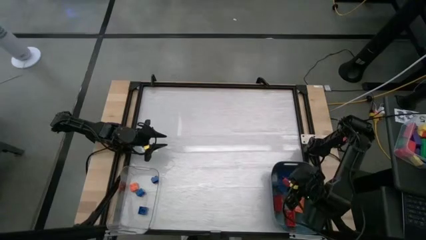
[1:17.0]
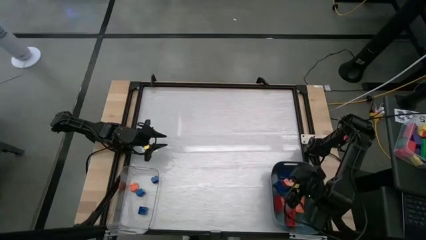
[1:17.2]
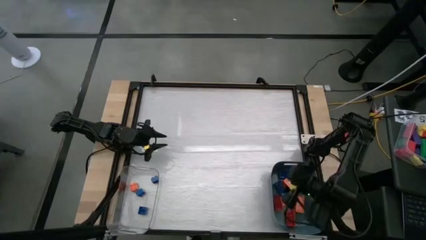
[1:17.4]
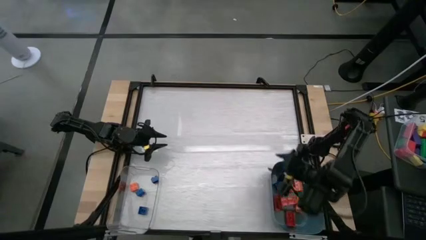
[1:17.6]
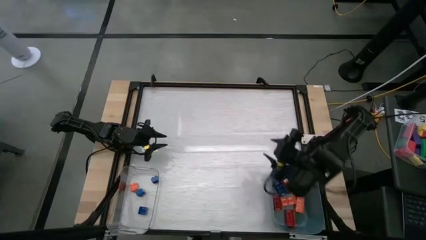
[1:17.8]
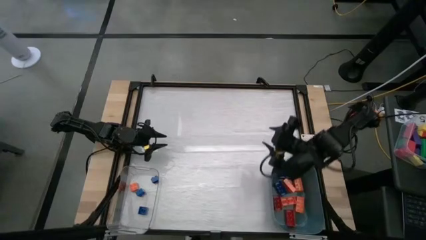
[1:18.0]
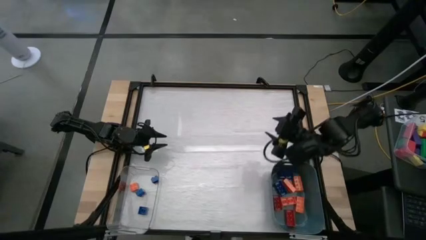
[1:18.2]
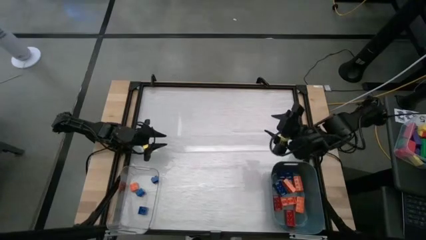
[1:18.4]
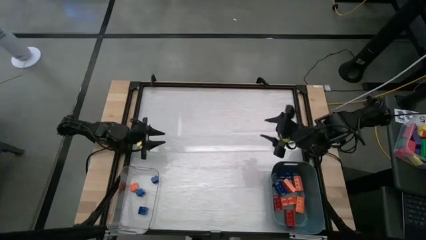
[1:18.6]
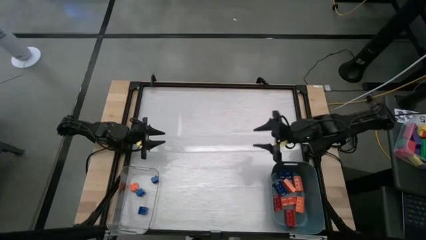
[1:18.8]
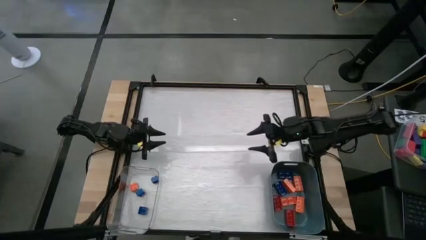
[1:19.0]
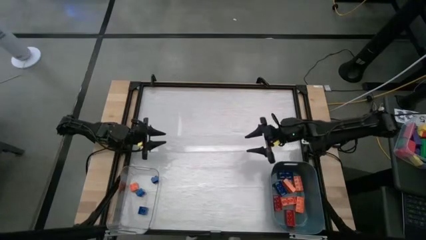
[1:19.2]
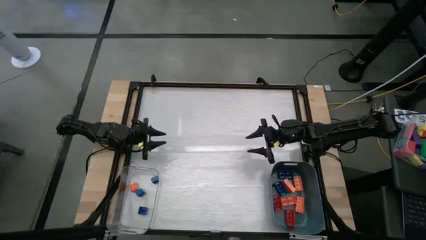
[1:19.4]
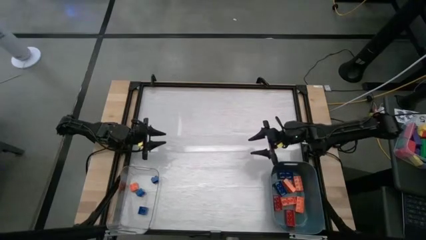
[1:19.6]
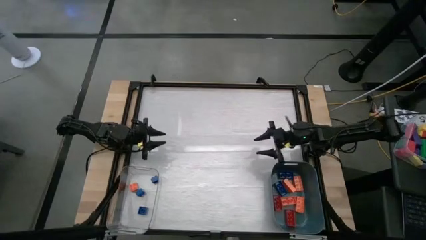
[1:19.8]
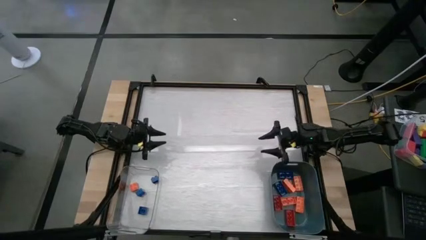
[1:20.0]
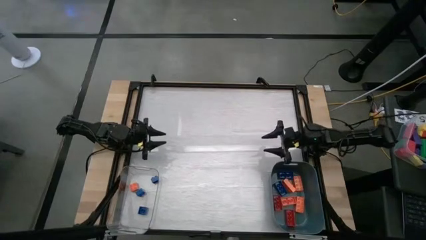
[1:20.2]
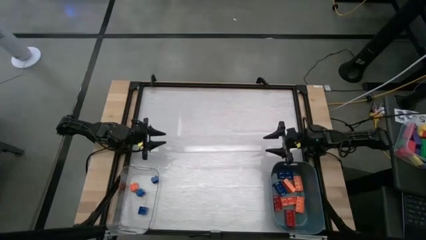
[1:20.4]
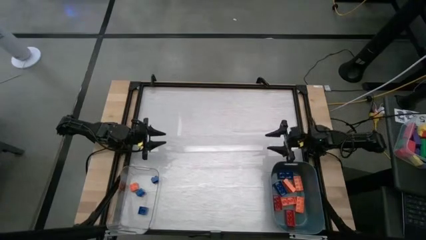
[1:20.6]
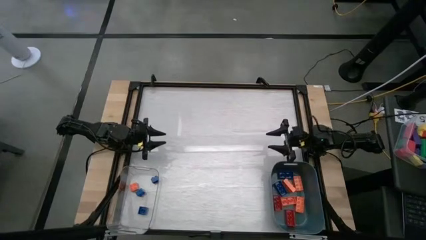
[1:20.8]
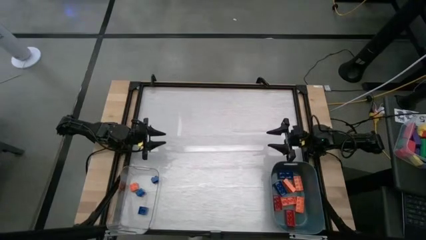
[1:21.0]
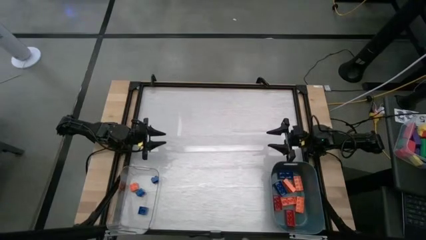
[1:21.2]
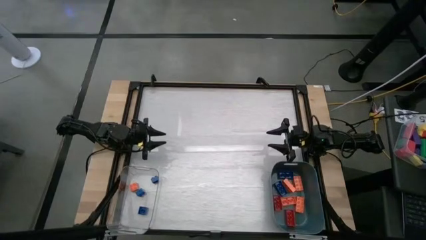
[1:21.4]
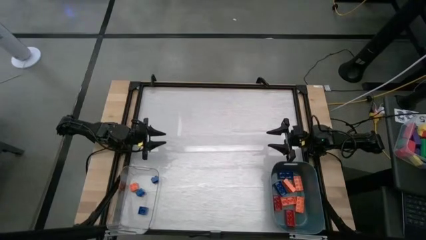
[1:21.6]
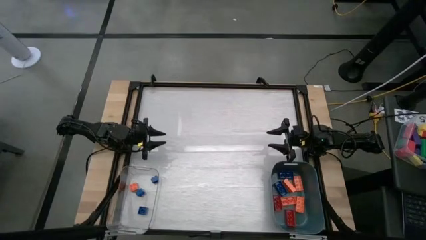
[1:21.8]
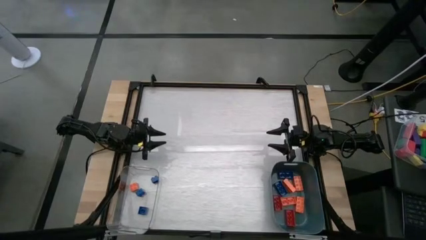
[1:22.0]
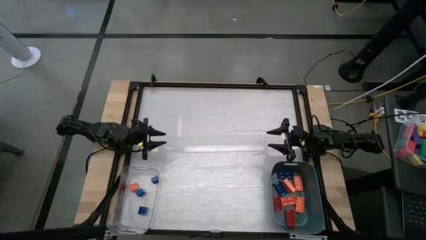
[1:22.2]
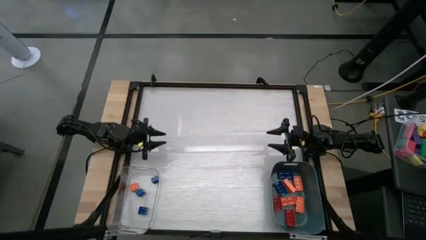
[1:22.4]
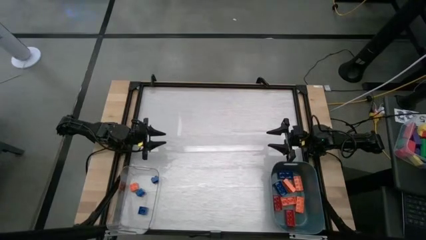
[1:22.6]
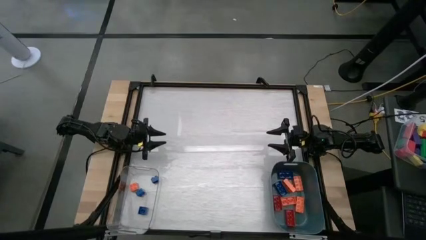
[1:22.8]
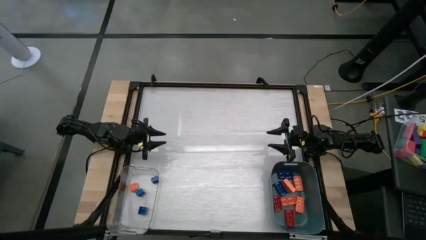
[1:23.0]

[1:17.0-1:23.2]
Task: Sort blocks by size
Return to Home Position

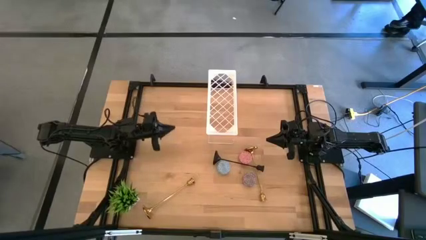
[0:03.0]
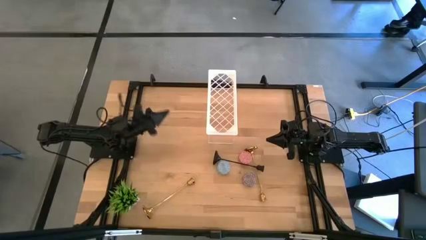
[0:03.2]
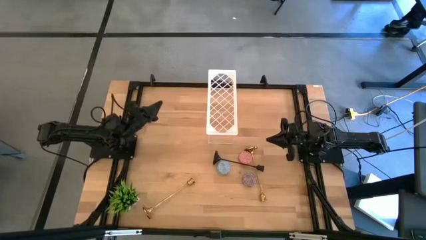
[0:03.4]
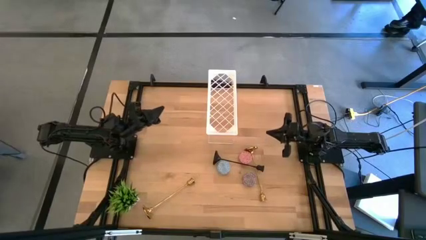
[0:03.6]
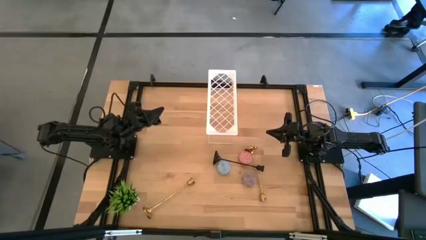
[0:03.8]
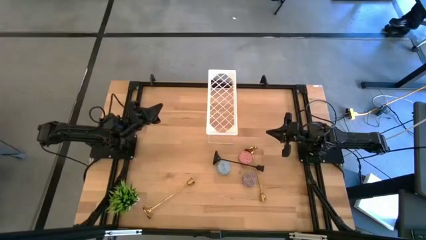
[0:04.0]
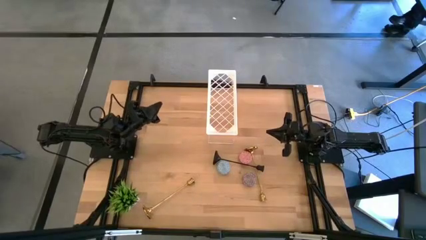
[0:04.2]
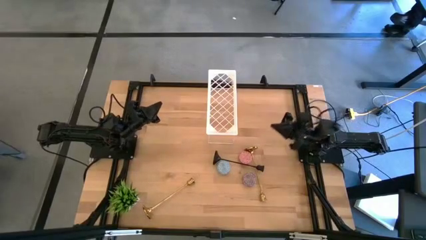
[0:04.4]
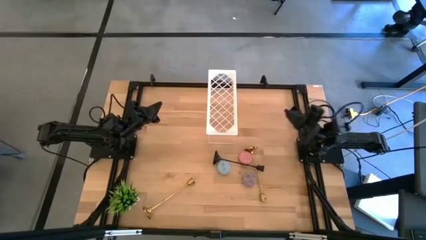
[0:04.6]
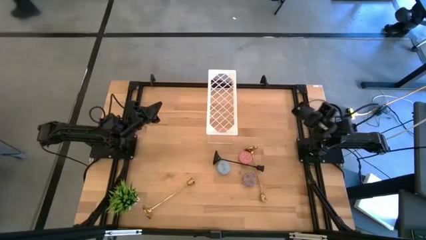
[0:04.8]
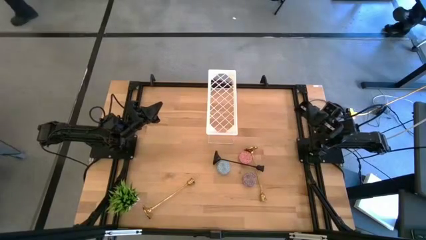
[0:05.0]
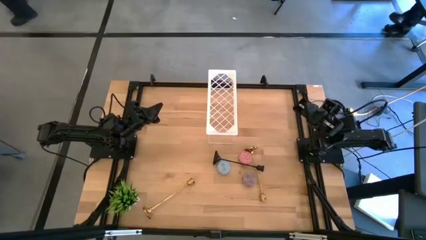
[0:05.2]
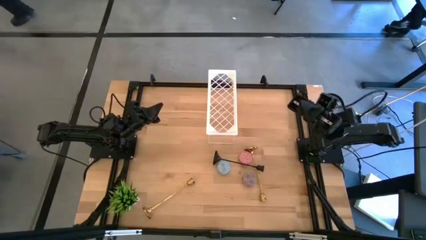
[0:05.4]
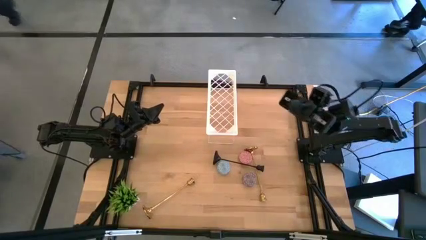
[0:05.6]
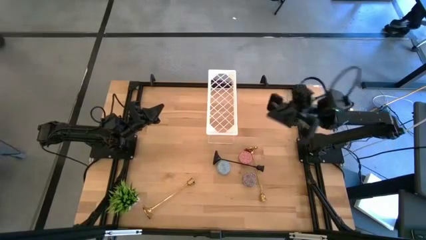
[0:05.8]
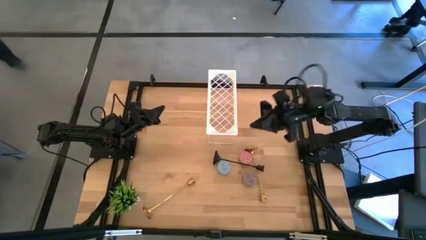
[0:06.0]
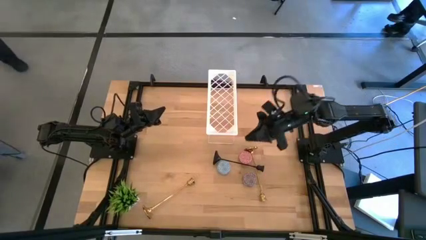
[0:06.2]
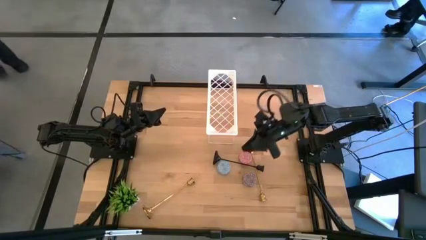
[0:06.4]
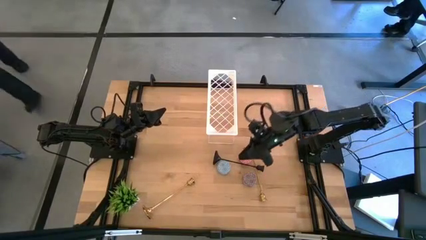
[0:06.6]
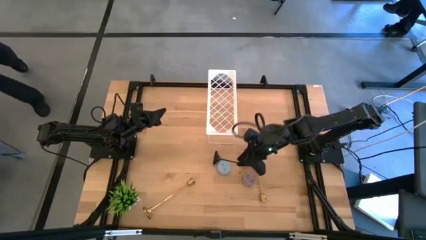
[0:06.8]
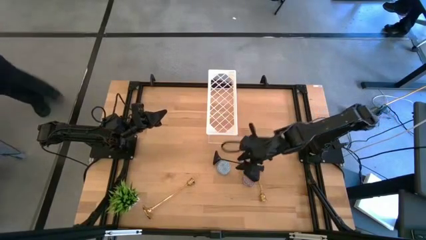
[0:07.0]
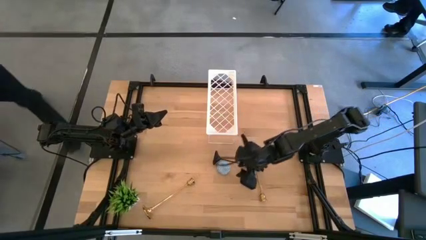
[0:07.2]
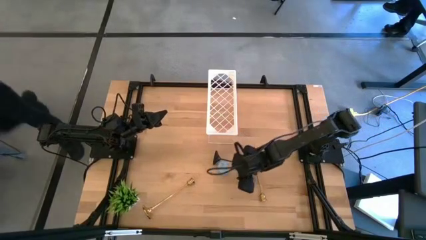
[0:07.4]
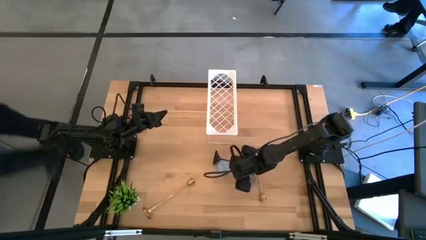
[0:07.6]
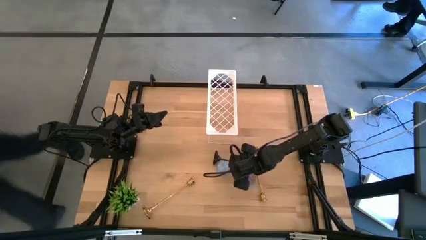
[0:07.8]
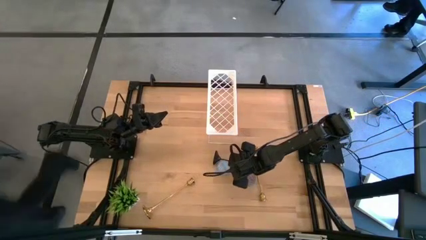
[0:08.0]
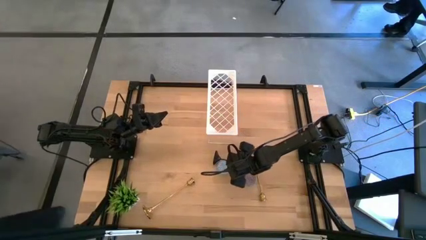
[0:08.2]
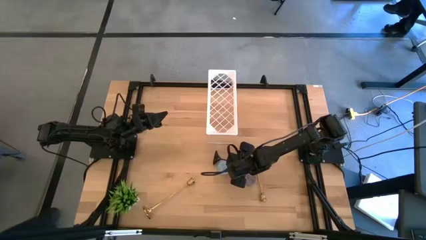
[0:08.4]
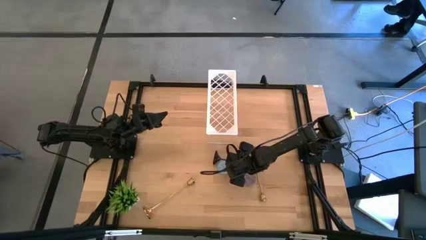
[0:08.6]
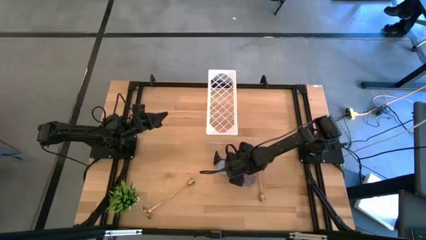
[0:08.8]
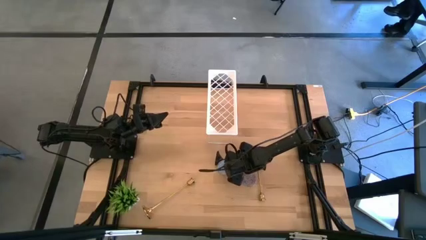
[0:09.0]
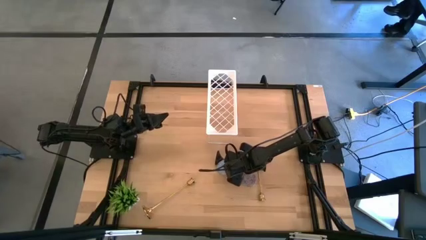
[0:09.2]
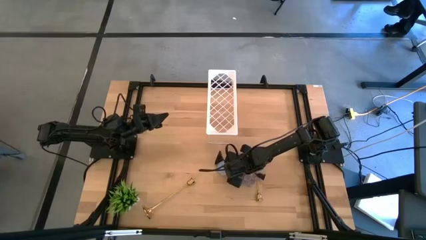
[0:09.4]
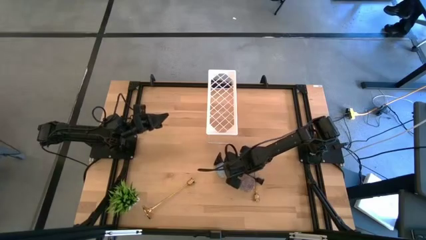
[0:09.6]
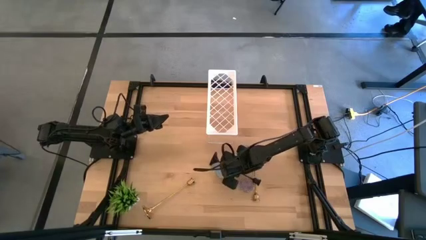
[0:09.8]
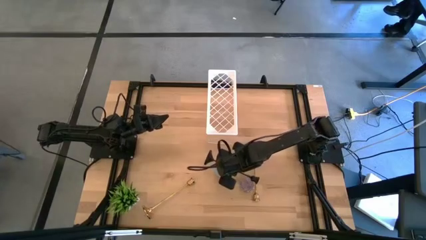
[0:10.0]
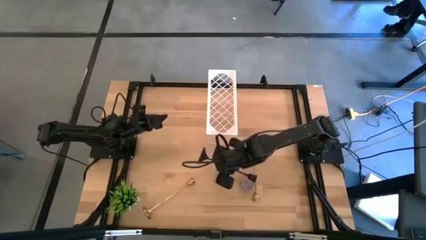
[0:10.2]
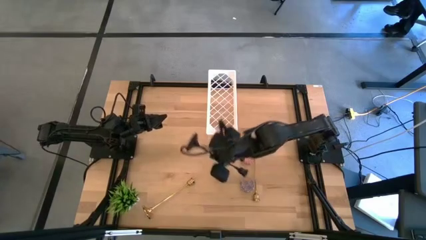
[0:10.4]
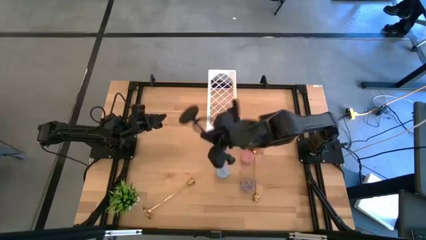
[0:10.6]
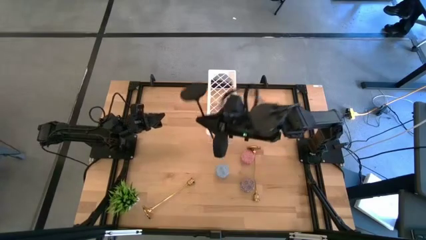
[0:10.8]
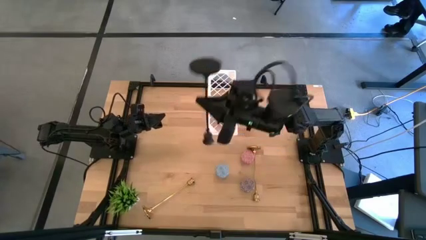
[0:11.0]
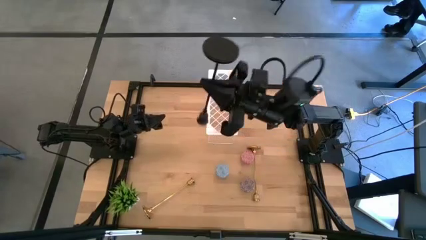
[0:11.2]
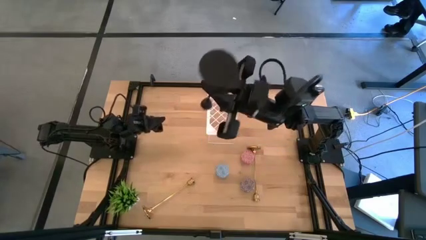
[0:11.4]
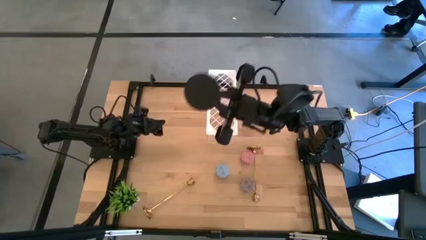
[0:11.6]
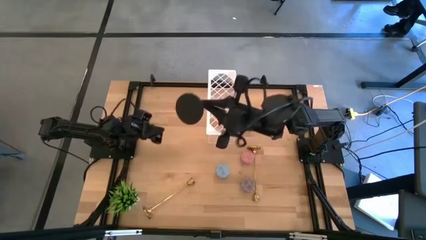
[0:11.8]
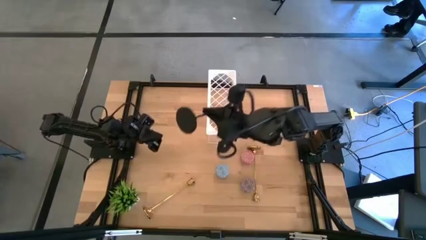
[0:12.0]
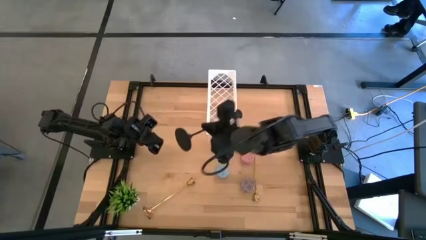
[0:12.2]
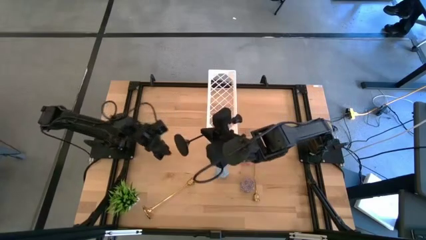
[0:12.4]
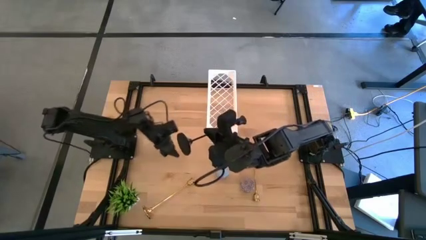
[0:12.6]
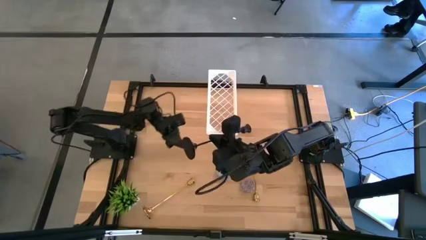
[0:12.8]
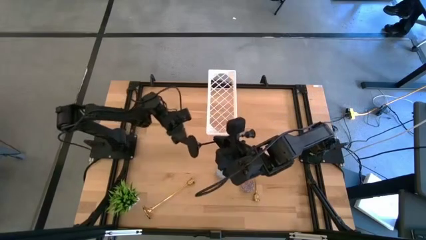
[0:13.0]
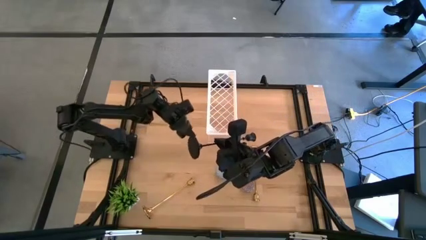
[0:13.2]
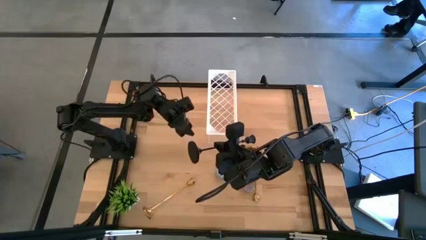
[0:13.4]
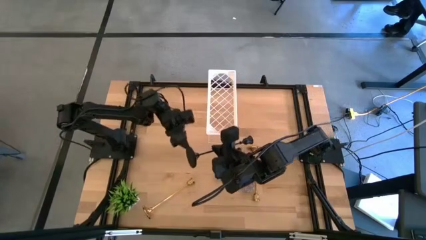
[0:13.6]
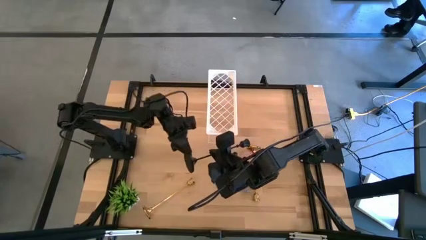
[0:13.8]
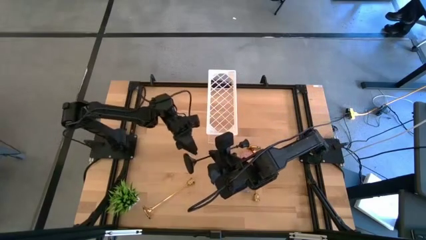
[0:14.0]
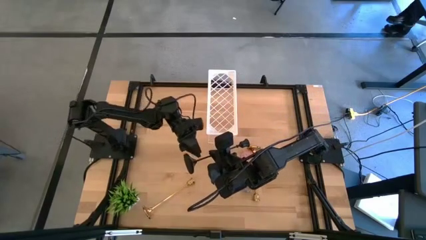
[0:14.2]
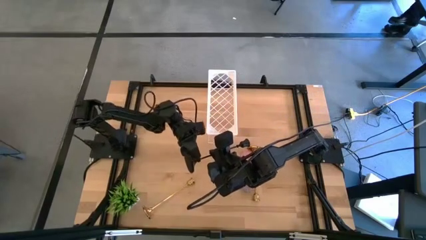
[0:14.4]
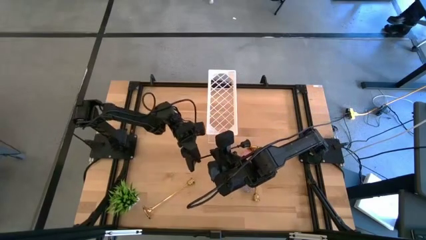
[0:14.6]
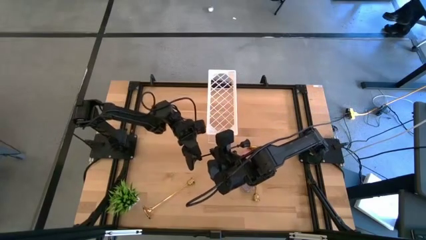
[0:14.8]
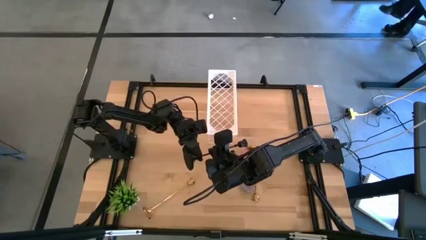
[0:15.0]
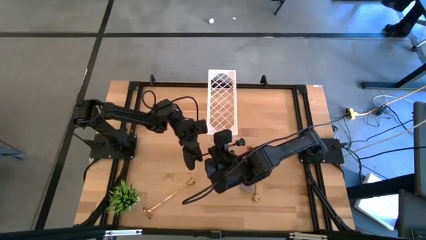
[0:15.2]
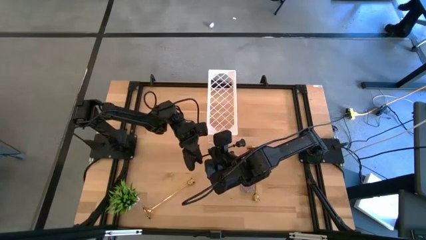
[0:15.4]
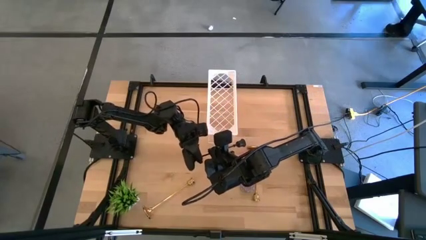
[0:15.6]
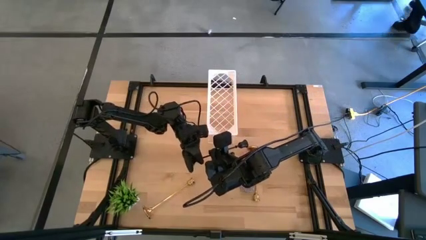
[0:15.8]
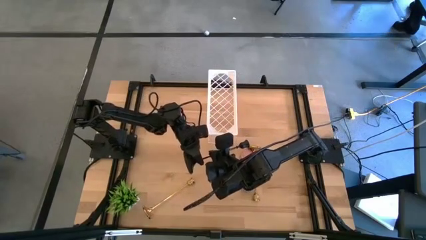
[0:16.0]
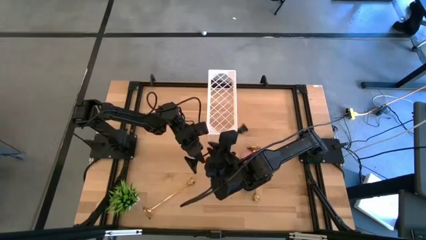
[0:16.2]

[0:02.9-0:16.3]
Task: Pick & Place candle stick holders
Put the black candle holder on the shelf
